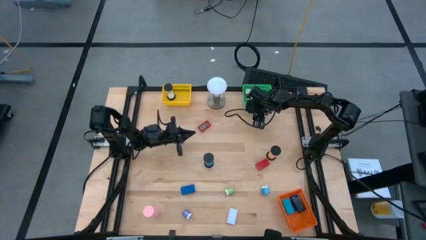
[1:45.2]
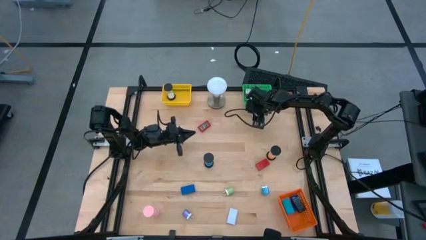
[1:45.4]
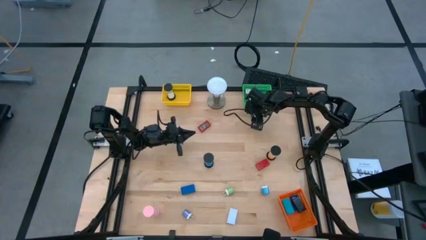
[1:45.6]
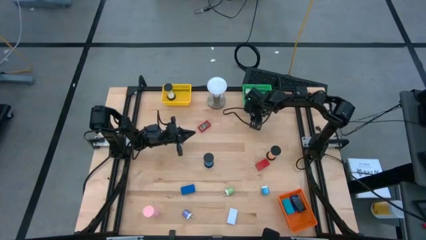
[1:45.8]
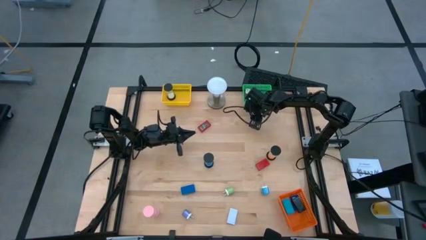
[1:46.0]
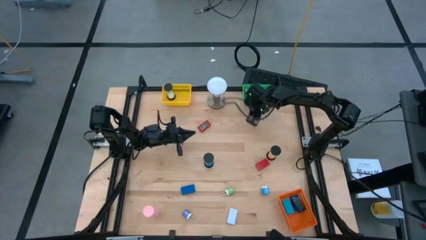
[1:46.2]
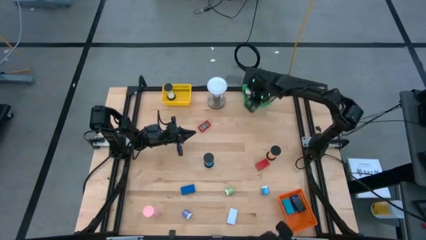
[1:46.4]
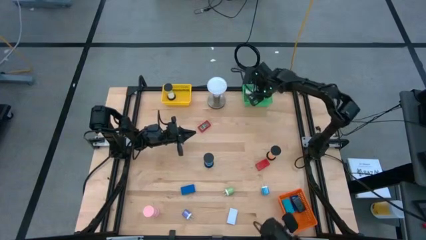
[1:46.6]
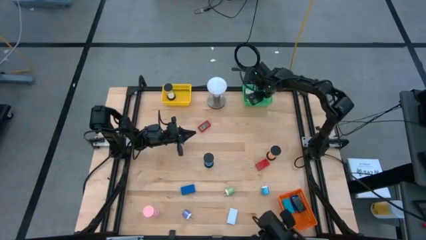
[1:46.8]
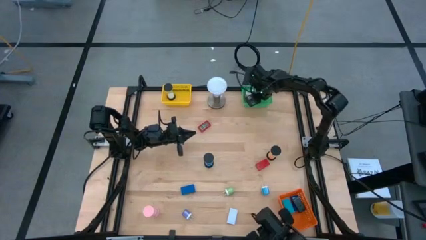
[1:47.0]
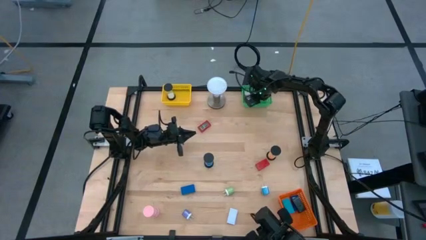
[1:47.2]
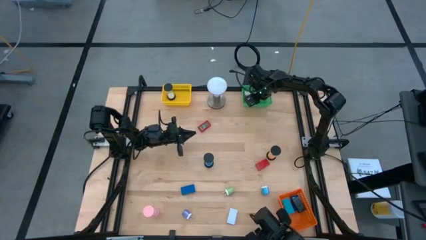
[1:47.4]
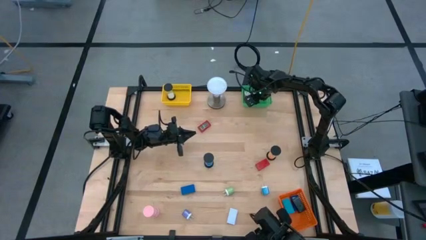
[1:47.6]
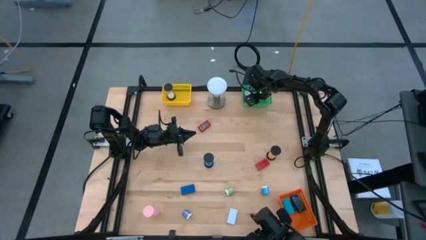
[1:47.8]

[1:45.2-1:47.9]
Task: Pick & Place Office items
Put the top green charger adapter into the green bin

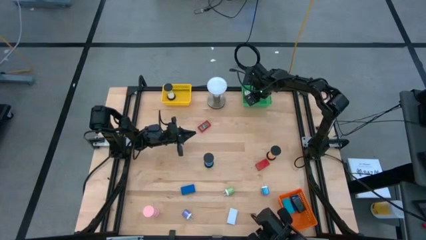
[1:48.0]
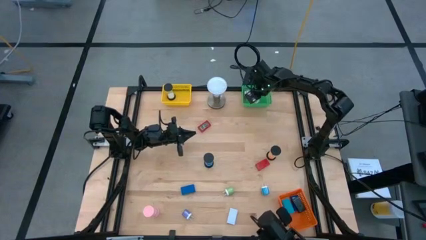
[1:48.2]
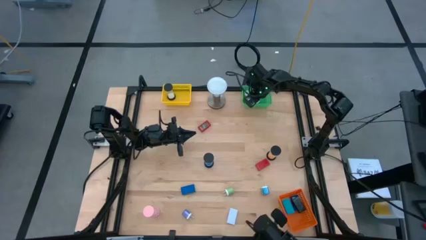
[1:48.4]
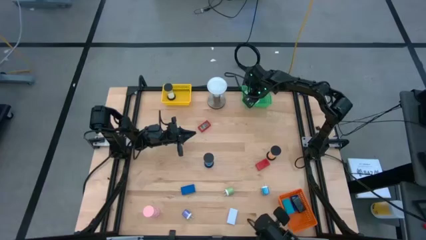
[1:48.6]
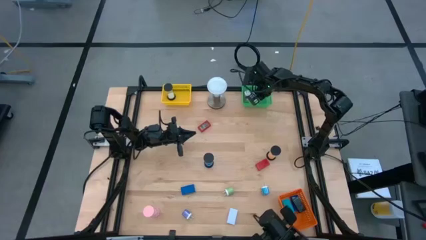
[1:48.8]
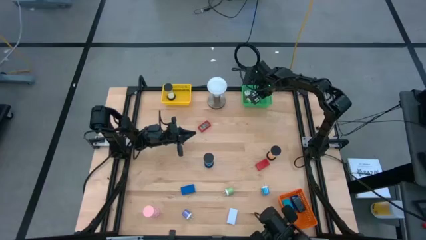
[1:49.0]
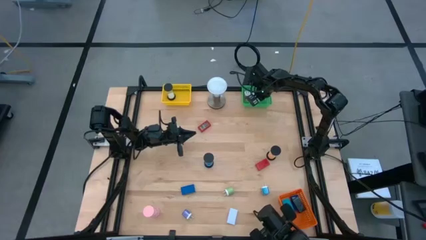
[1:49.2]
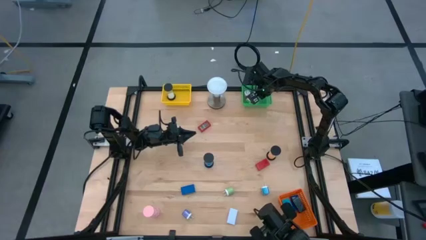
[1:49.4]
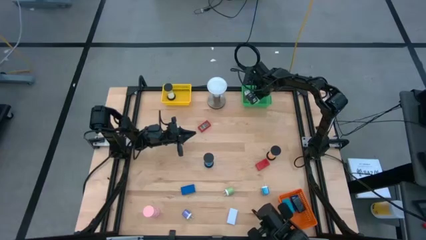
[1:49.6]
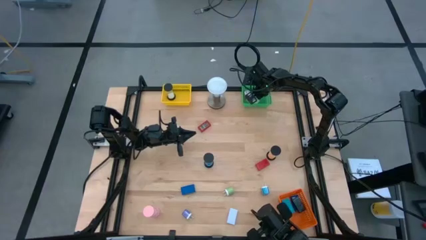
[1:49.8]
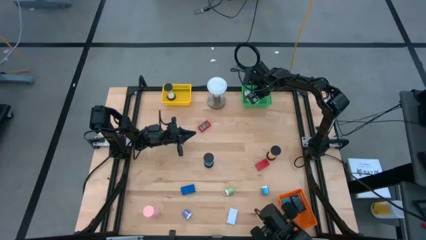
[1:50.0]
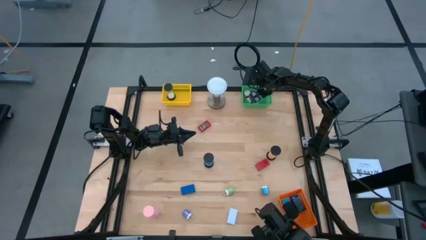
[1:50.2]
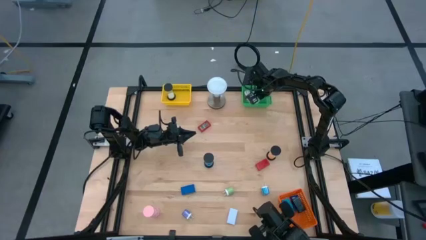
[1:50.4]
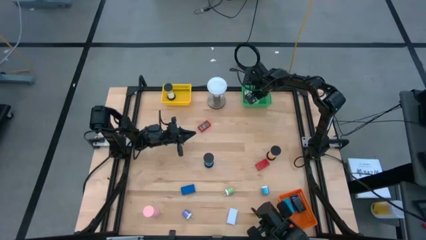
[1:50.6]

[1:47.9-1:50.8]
Adjust the purple charger adapter in the green bin

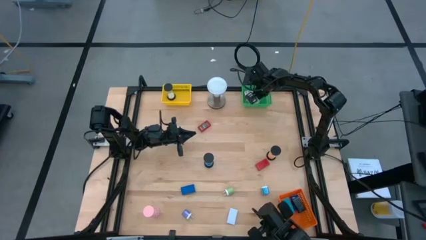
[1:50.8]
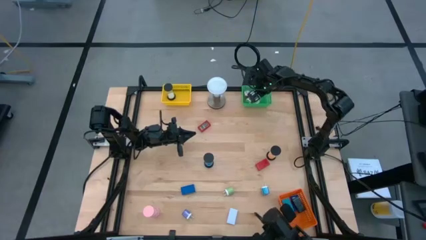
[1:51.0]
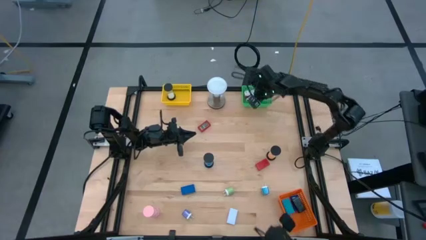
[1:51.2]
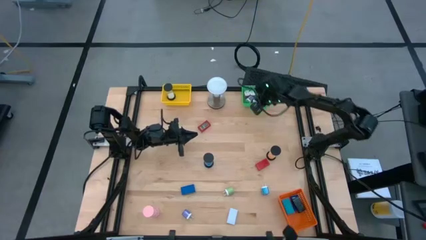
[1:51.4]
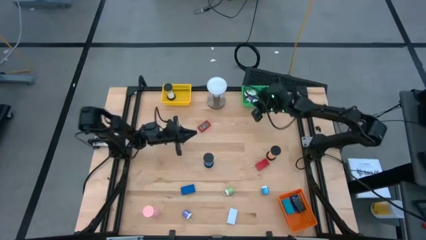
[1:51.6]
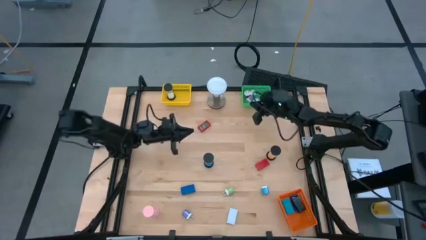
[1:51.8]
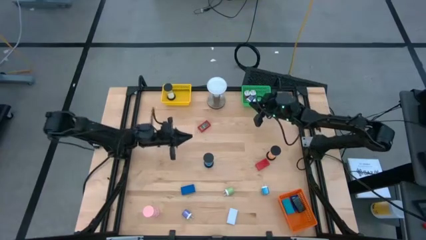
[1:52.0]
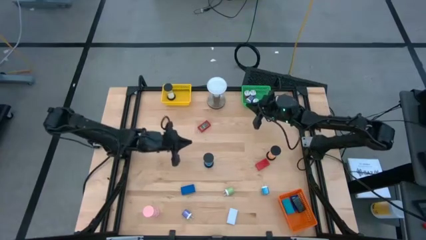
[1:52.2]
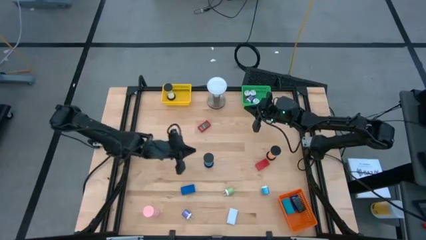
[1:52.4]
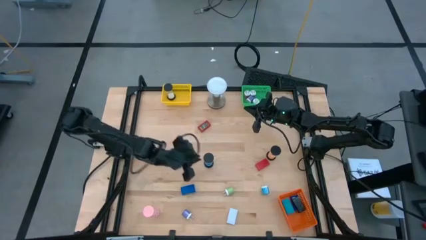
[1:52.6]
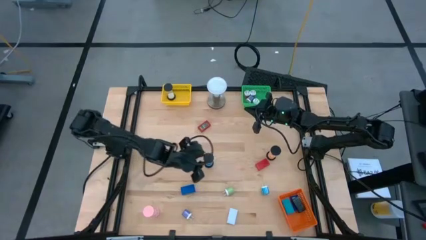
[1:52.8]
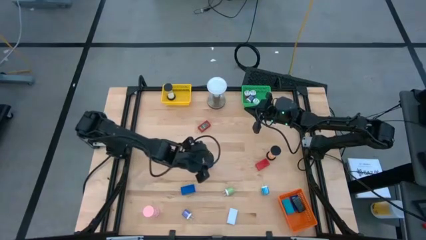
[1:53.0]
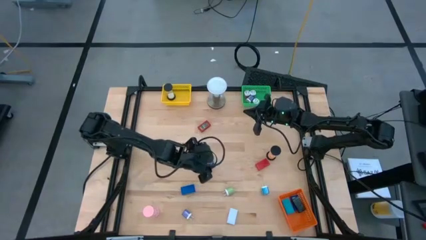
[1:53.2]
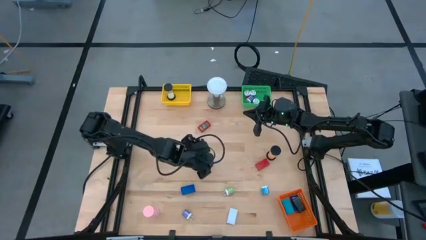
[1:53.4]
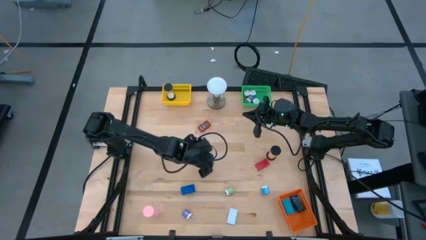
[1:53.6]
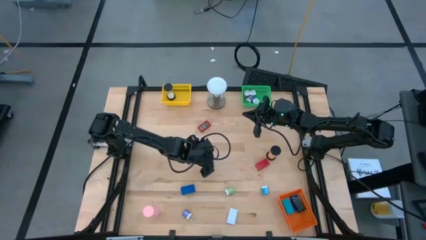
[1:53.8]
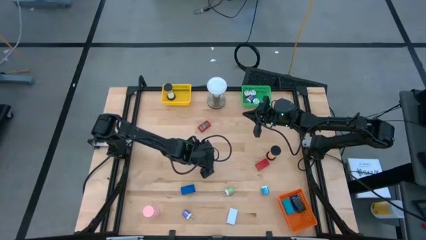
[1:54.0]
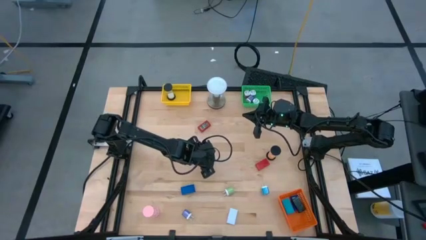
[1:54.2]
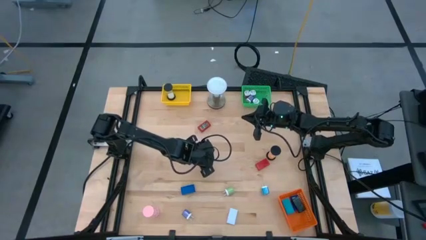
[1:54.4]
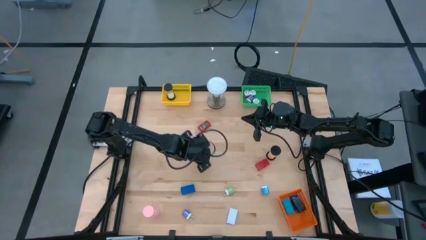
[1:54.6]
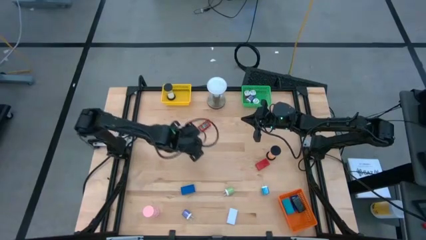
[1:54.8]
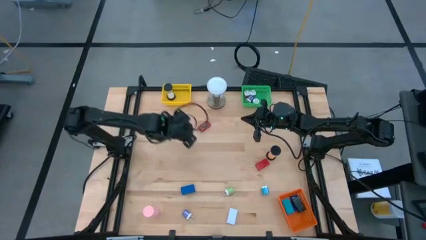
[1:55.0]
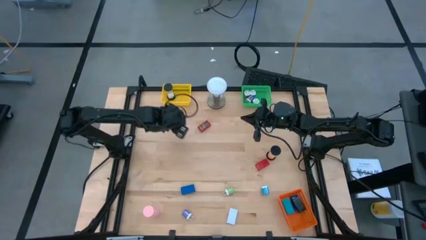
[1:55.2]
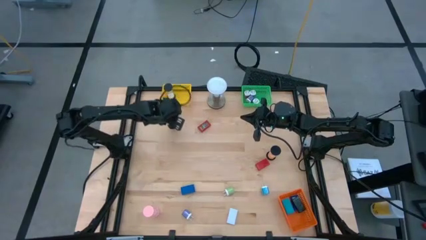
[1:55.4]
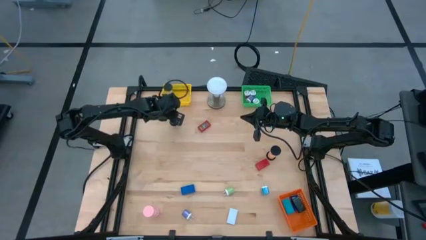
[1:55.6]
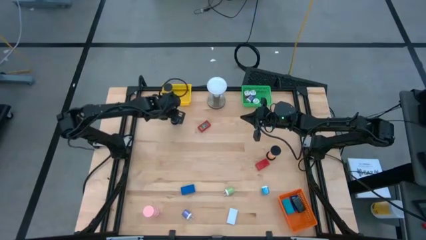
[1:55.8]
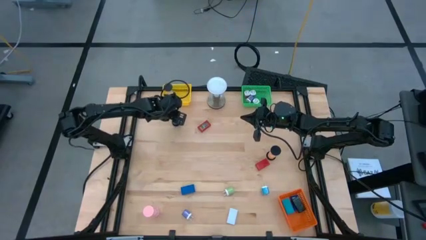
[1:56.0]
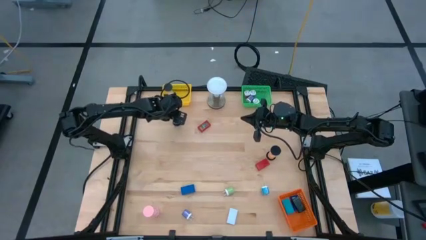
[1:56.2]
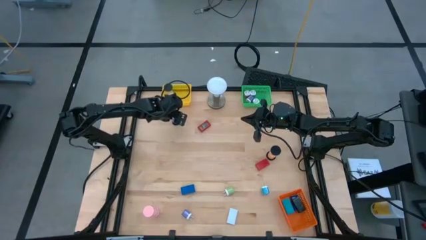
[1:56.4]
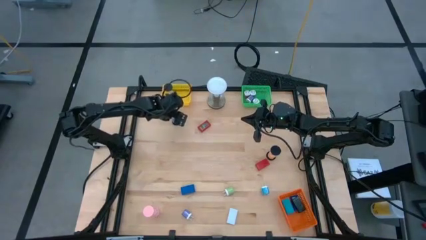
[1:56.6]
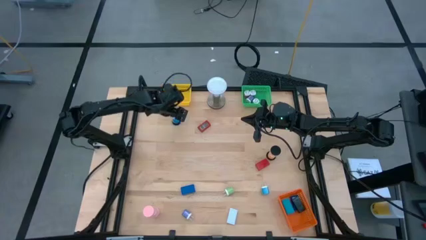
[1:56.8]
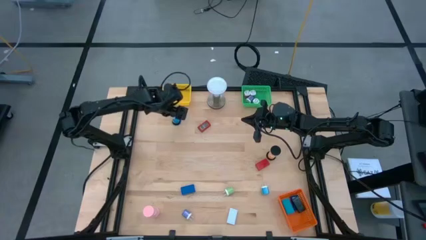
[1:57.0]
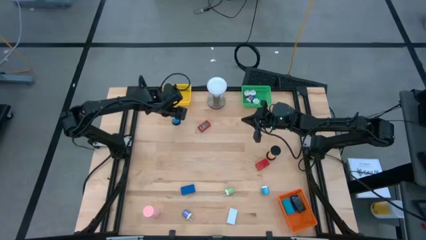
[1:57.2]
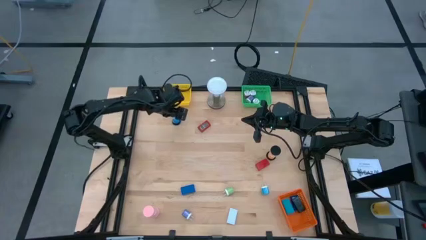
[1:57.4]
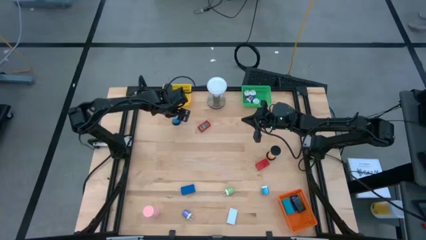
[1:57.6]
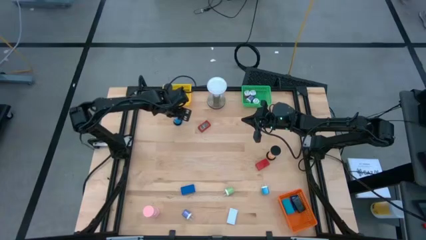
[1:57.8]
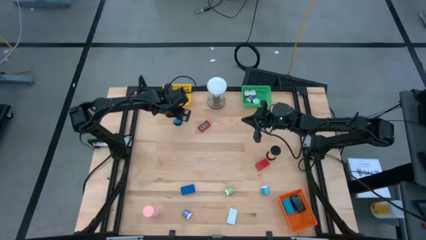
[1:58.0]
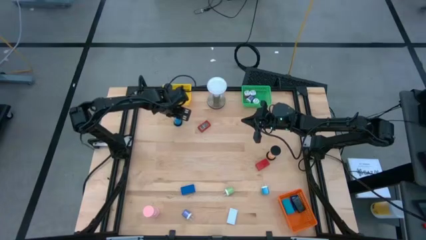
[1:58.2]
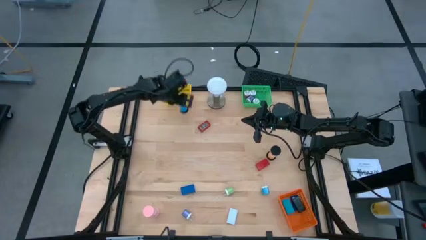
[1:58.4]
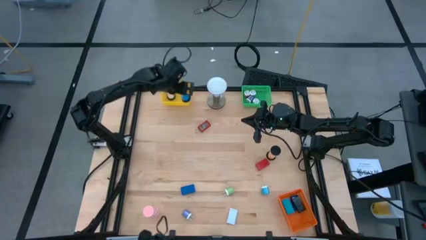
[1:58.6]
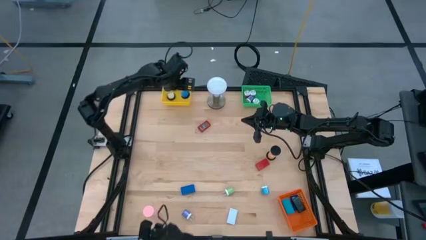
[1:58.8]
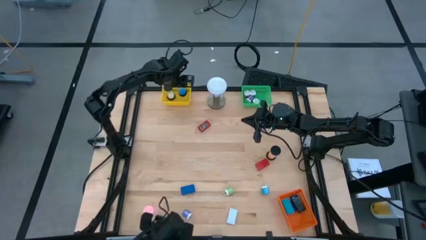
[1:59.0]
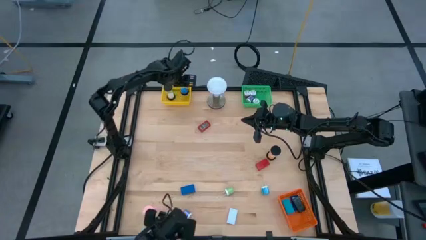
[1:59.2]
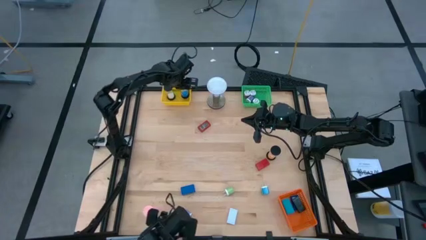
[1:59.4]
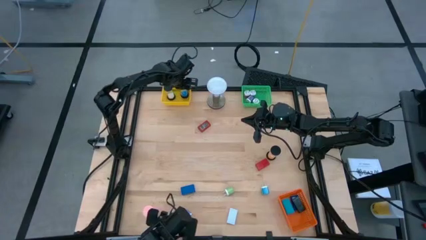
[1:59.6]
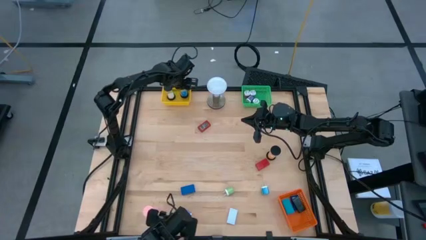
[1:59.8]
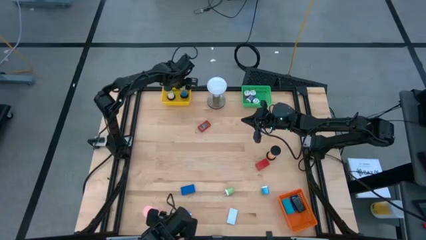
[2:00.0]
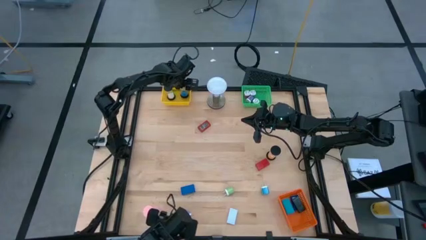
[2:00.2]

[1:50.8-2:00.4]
Put the blue hourglass into the yellow bin
